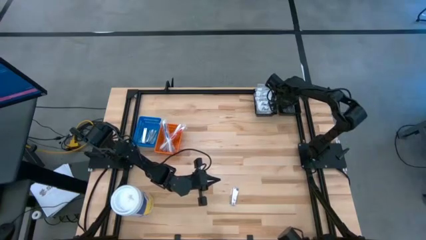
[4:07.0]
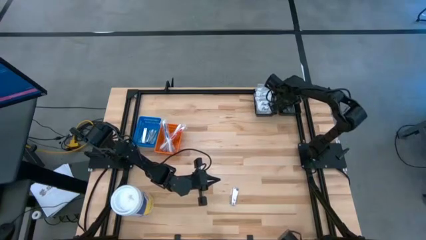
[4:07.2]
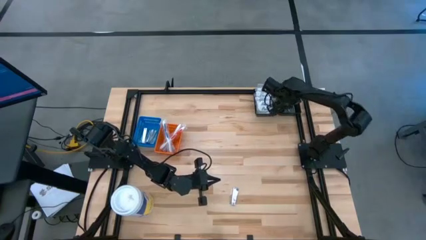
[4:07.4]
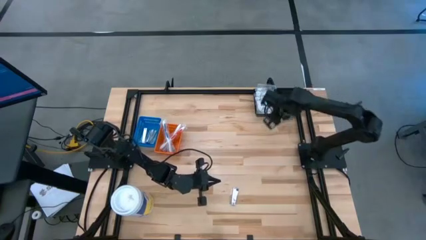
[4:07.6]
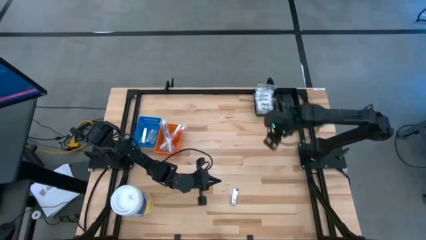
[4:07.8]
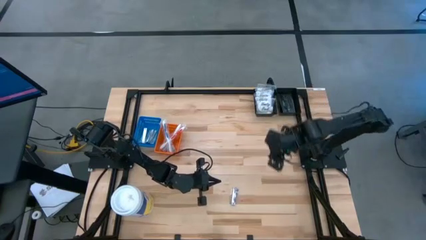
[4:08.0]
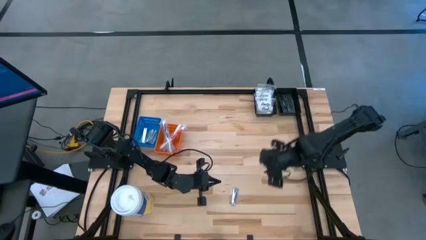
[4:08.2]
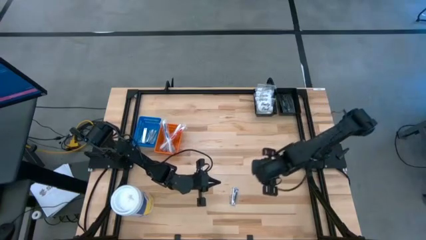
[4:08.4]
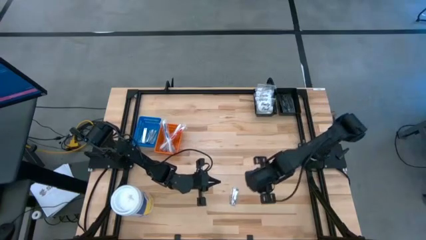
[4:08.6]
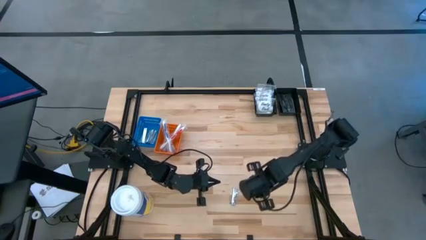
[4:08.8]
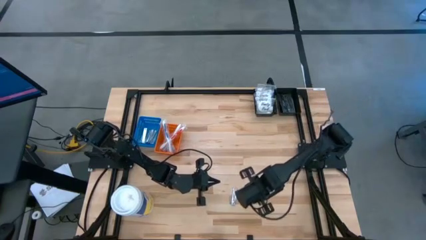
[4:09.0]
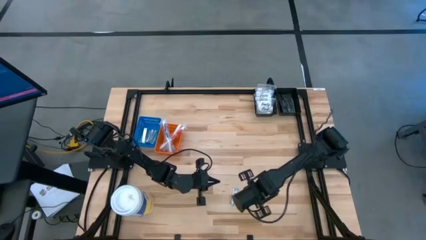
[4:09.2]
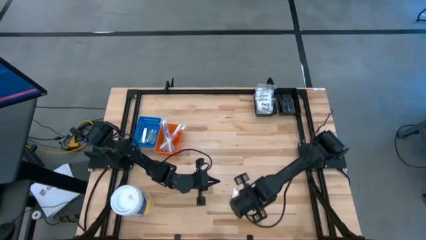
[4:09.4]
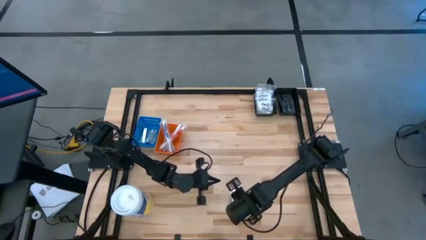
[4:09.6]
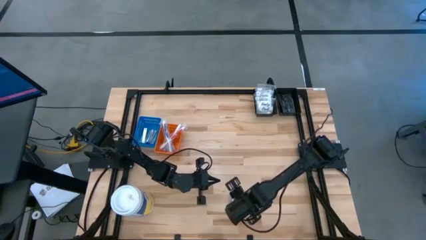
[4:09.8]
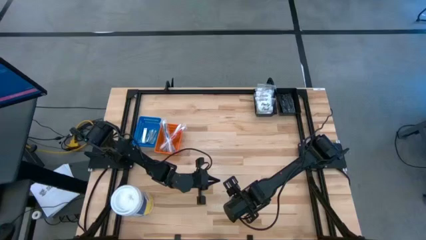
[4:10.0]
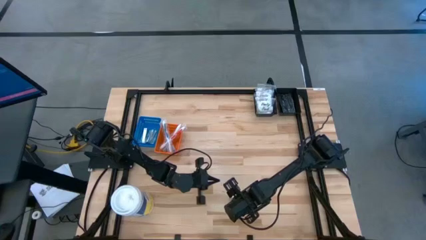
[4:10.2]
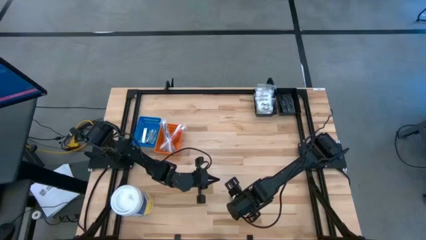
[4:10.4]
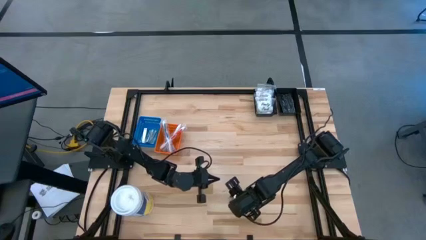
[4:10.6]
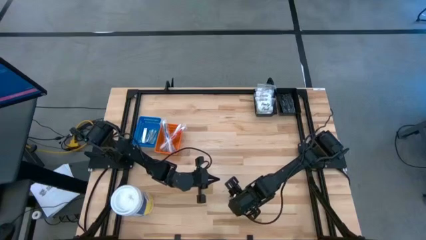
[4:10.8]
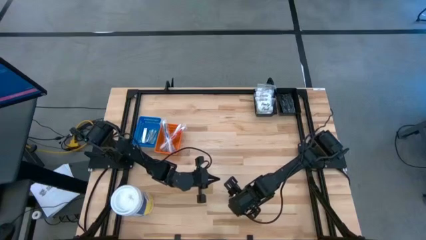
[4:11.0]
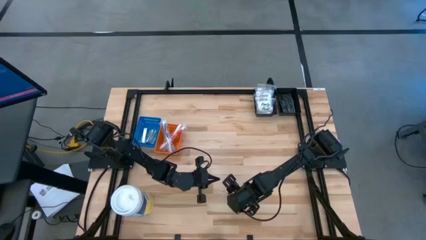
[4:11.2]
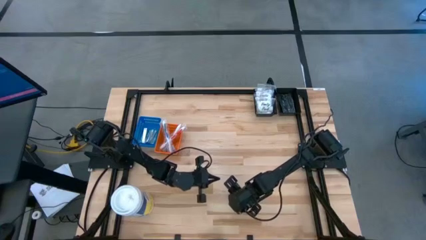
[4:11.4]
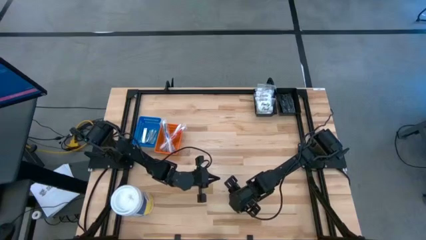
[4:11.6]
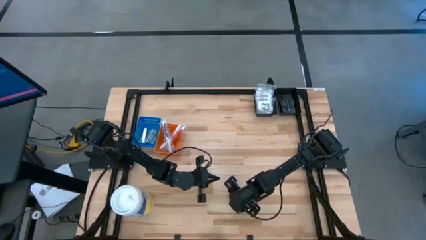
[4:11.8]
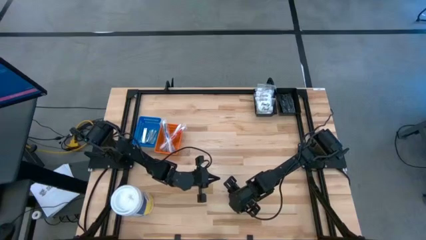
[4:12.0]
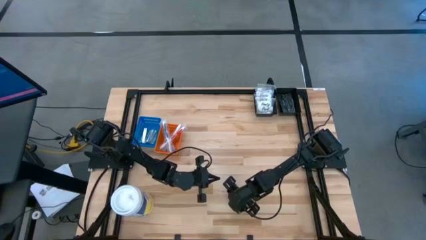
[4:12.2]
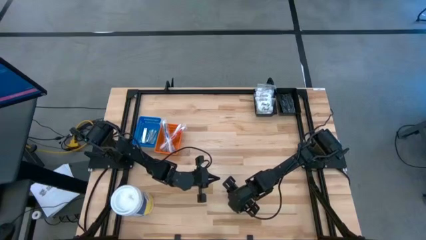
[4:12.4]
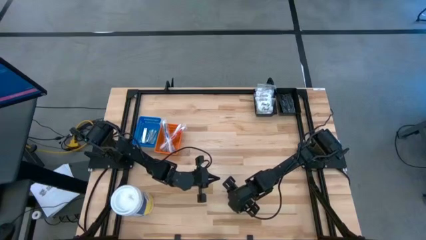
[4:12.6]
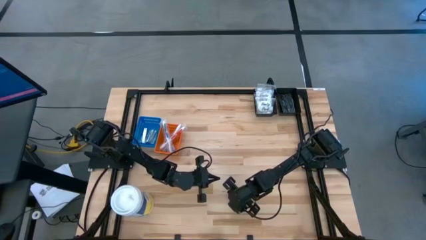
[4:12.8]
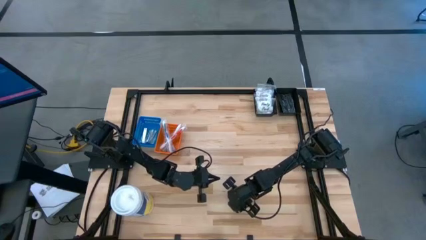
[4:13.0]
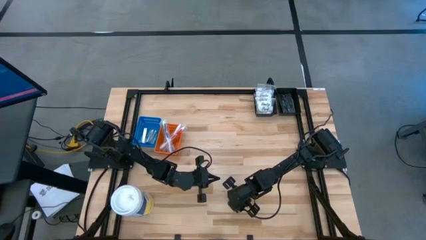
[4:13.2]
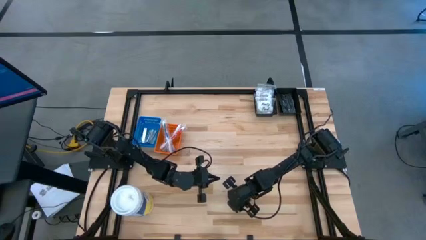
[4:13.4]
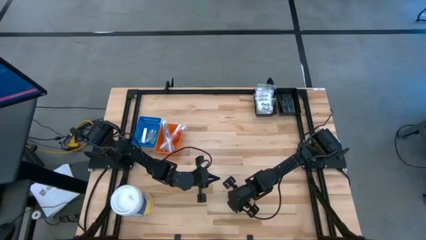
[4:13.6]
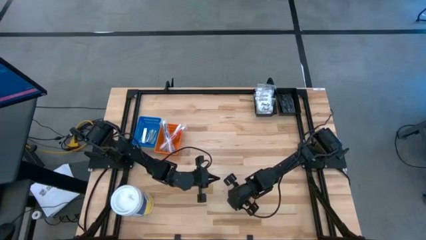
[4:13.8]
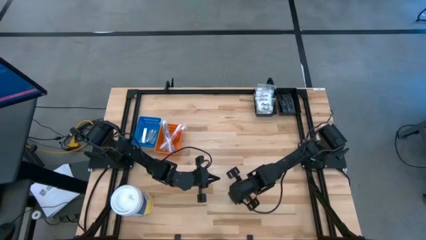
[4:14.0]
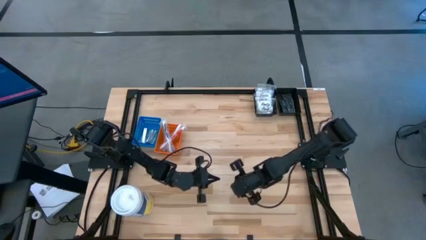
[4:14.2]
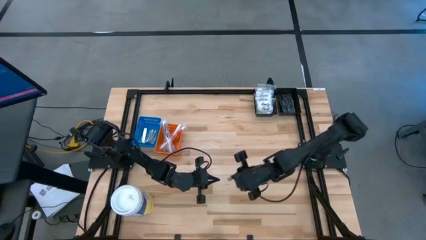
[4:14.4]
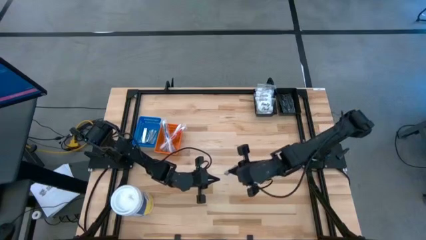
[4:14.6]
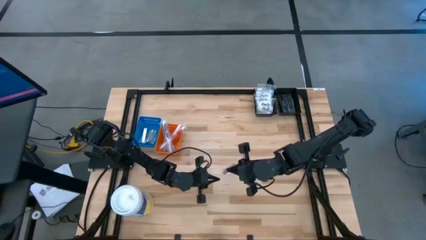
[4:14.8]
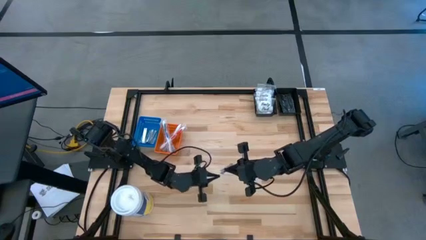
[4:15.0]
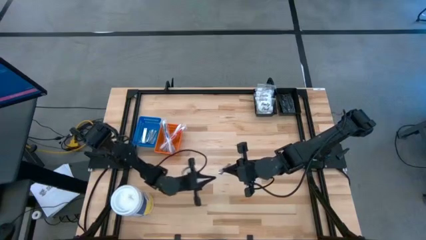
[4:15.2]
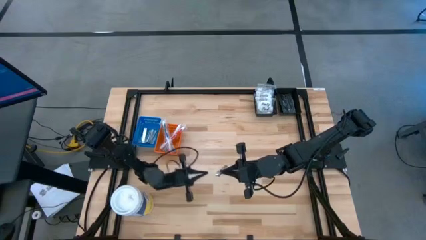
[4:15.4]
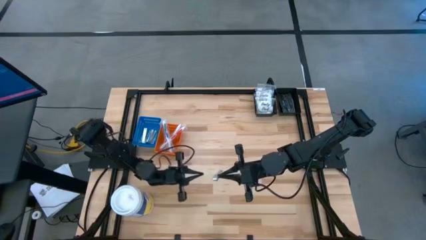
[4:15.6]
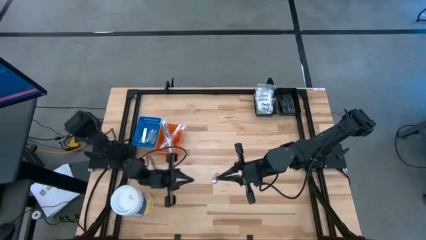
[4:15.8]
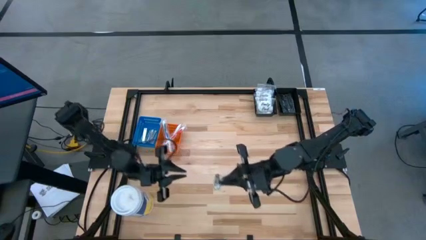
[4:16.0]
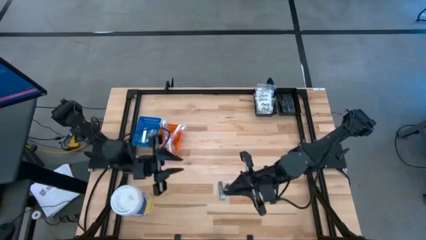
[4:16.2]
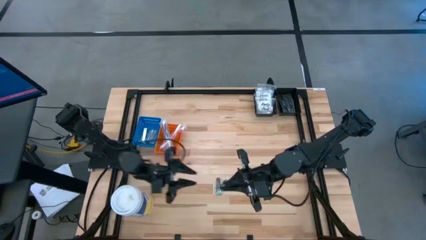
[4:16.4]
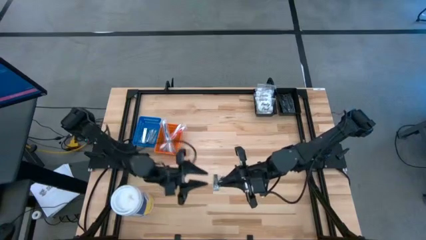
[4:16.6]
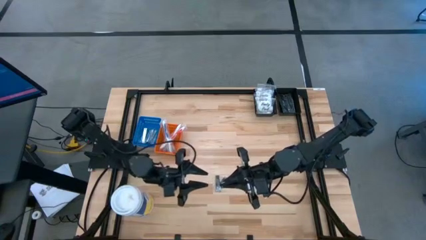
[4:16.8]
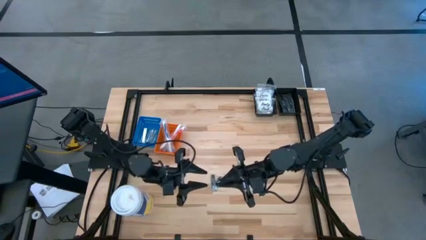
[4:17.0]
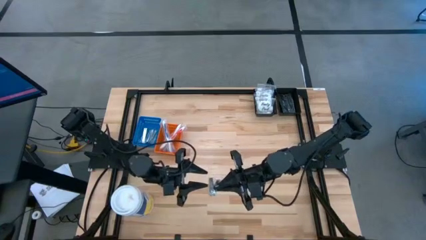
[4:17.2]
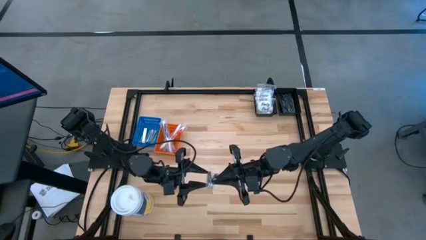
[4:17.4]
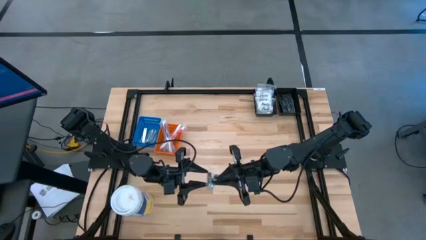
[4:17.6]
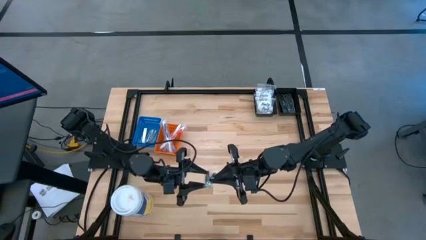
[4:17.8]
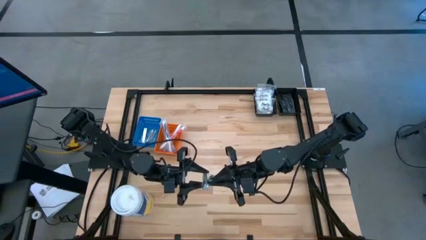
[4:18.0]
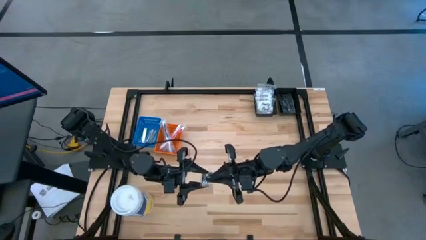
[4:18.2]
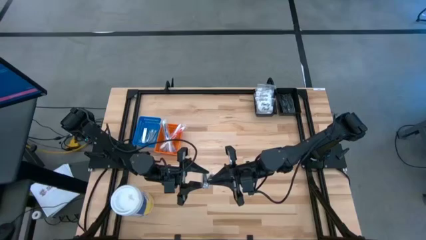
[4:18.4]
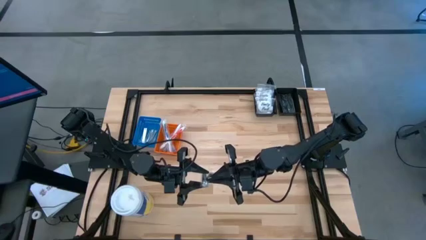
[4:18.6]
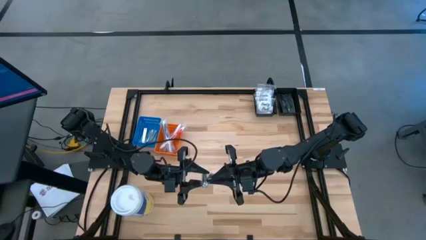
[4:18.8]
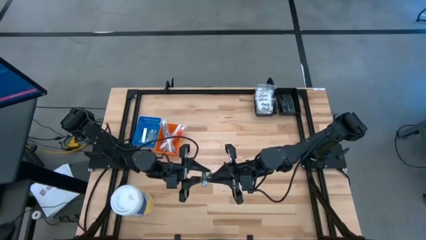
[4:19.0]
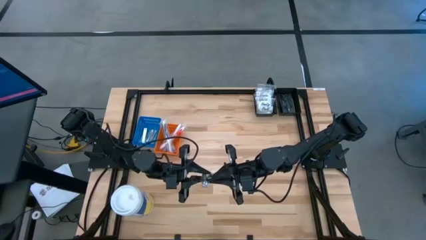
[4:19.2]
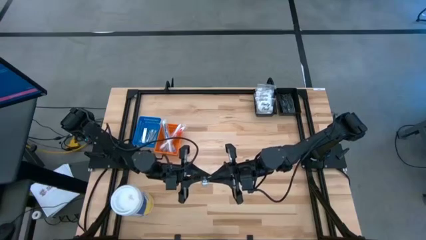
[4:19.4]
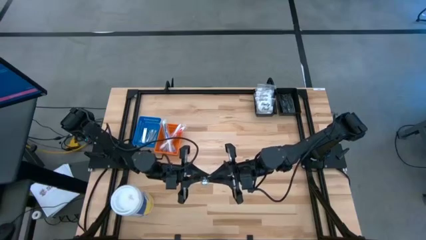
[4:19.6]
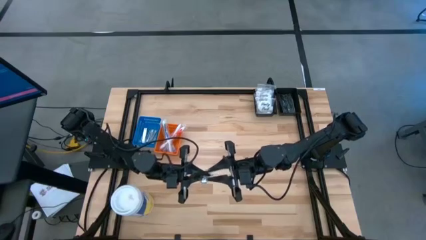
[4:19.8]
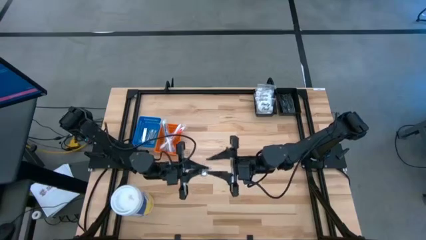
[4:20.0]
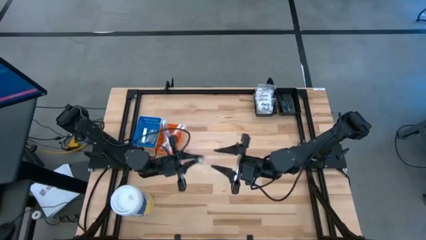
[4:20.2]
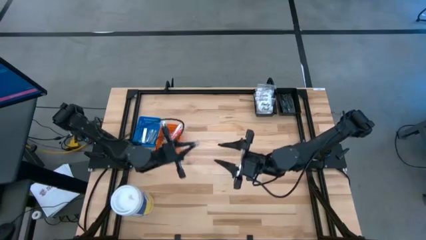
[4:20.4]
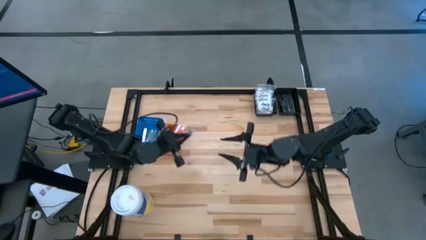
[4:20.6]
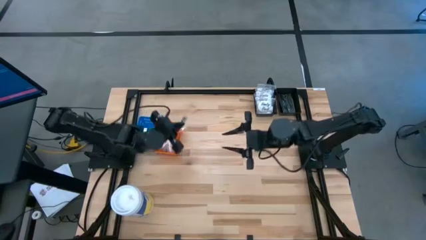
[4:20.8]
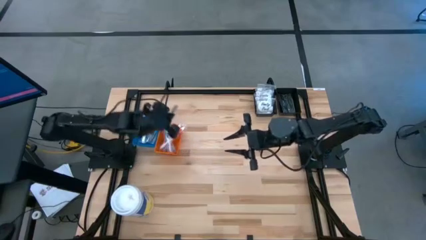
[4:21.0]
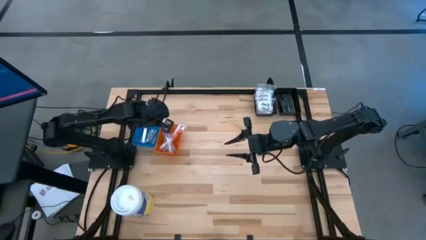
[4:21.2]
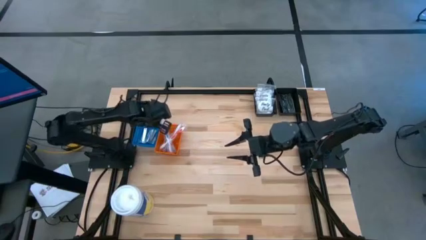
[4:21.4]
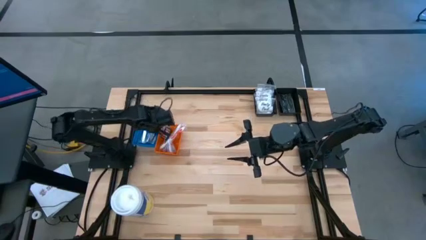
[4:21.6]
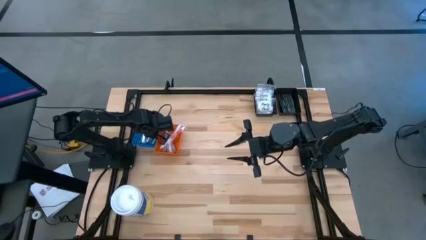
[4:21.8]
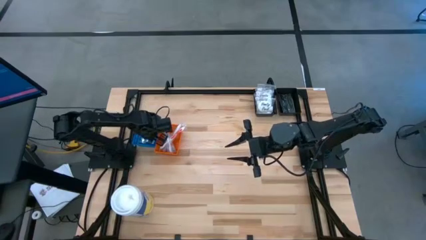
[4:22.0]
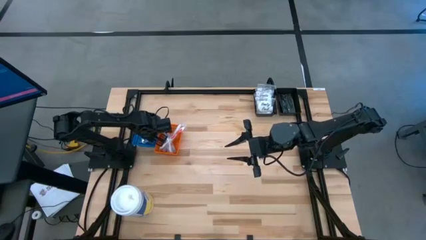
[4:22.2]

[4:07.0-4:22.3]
Task: Pick & Place Travel size toiletries
Put the silver nail cutter into the blue bin

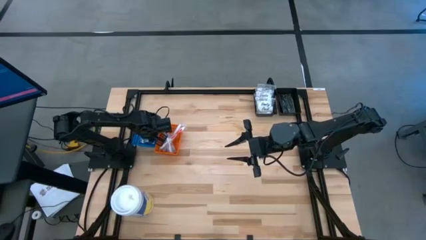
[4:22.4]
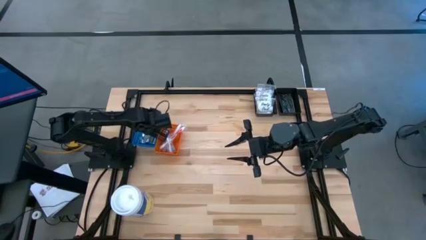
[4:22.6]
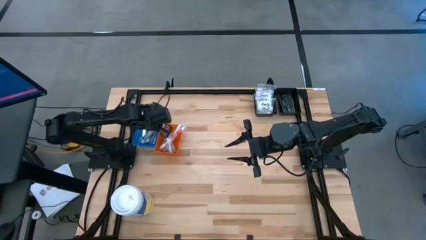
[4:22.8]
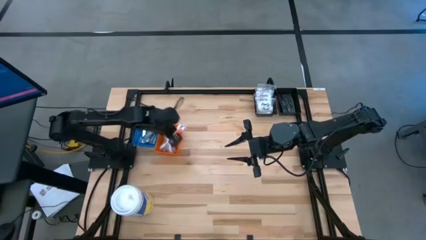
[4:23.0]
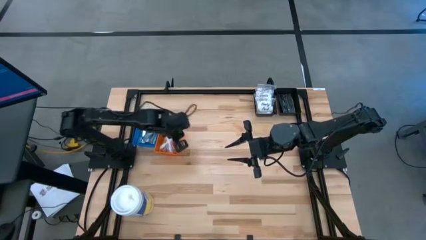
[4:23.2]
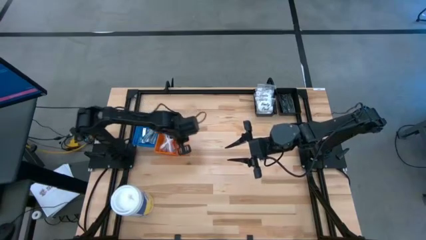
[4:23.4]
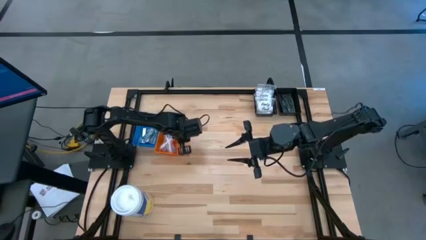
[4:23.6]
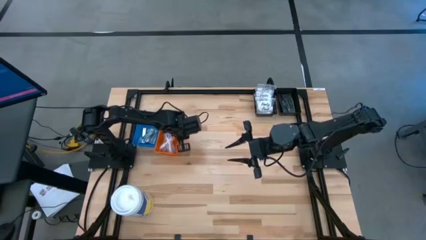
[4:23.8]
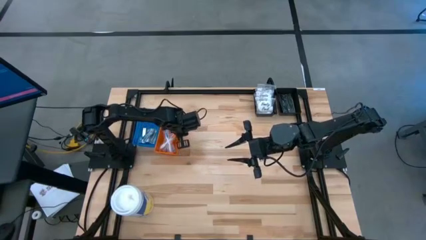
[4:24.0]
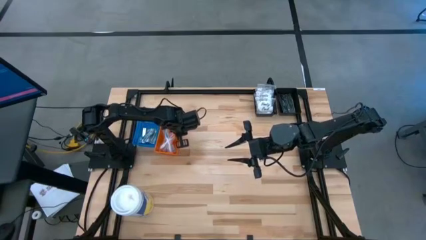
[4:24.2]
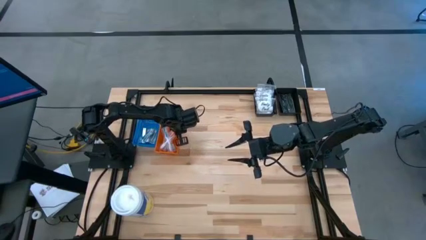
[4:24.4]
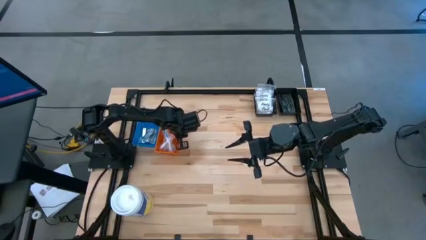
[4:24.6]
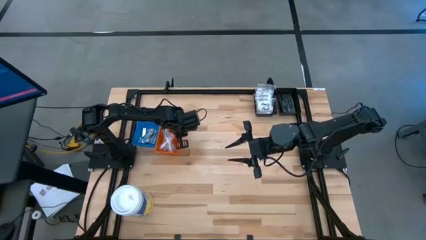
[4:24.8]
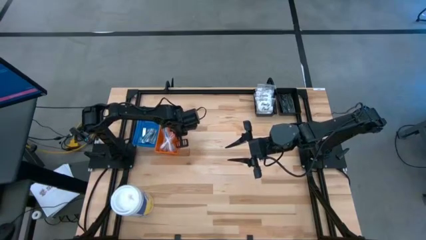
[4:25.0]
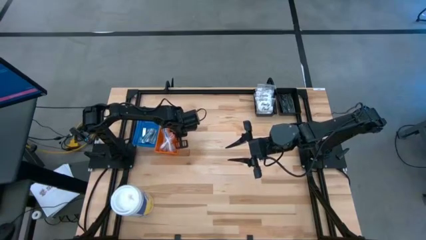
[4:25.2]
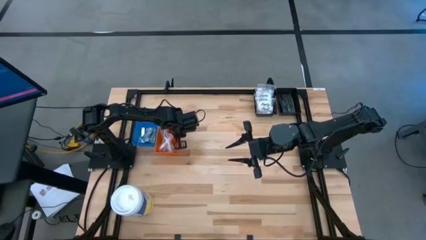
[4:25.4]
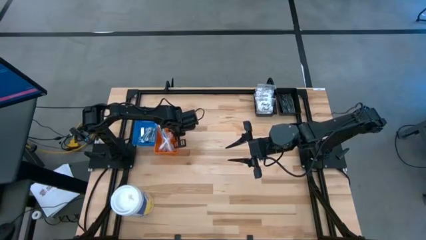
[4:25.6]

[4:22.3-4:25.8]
Adjust the orange bin
